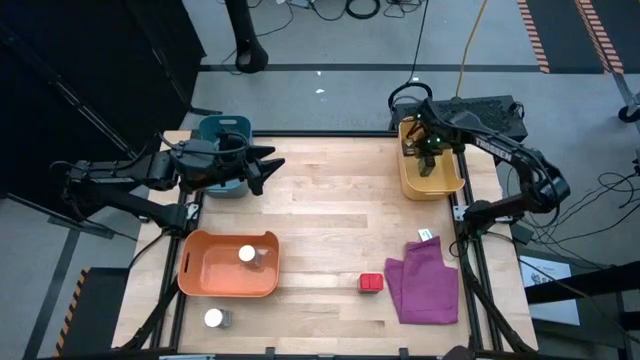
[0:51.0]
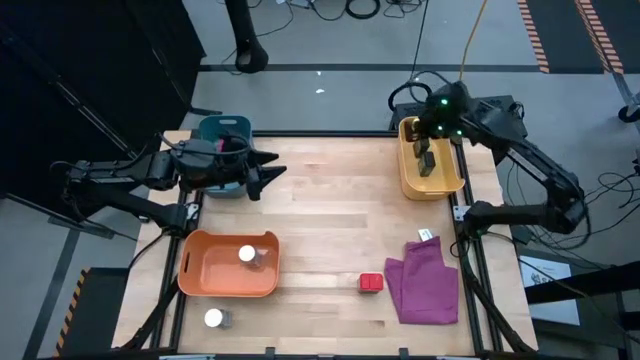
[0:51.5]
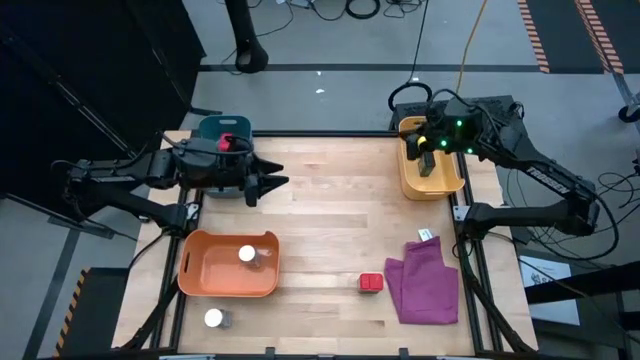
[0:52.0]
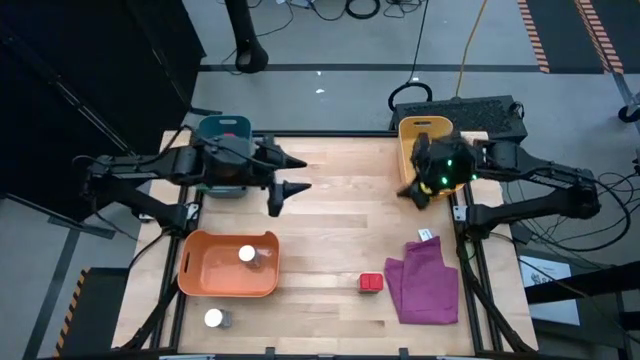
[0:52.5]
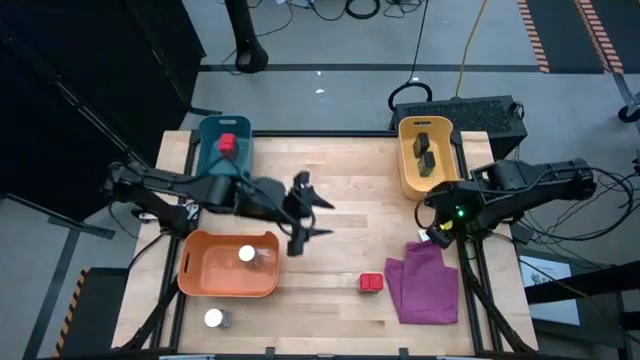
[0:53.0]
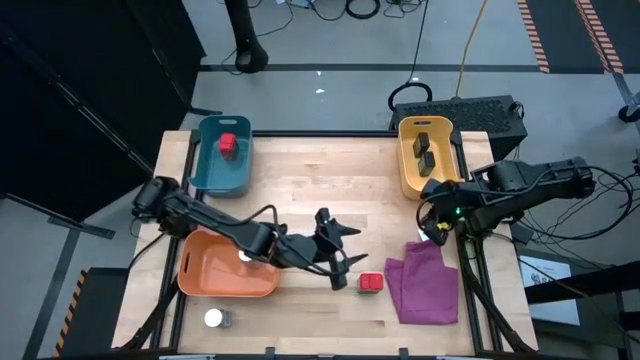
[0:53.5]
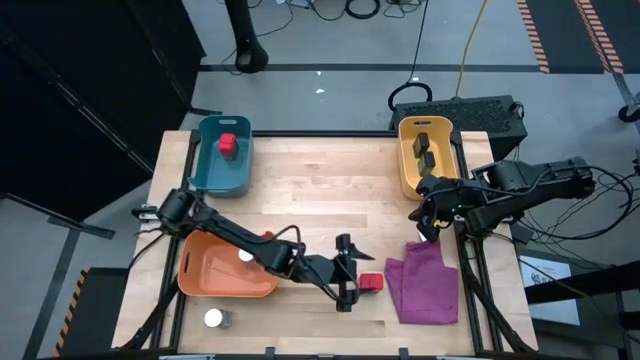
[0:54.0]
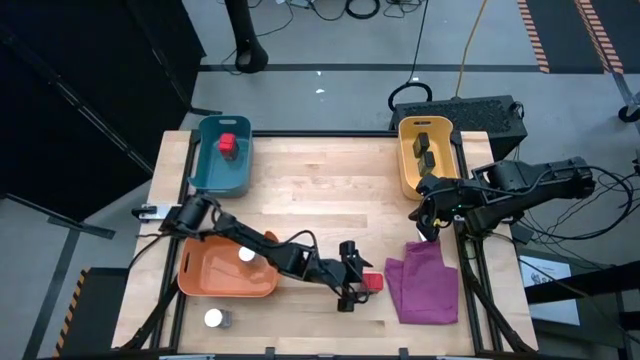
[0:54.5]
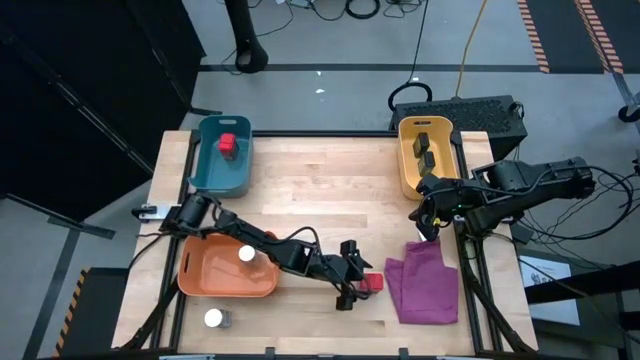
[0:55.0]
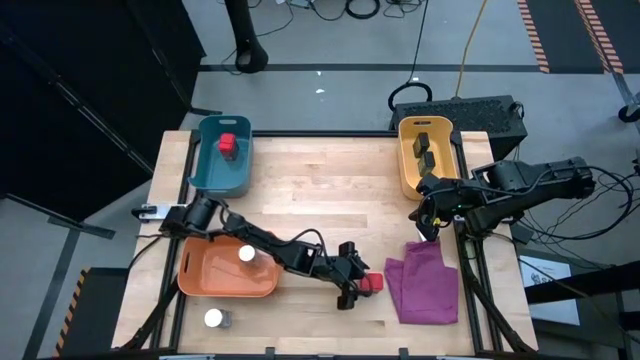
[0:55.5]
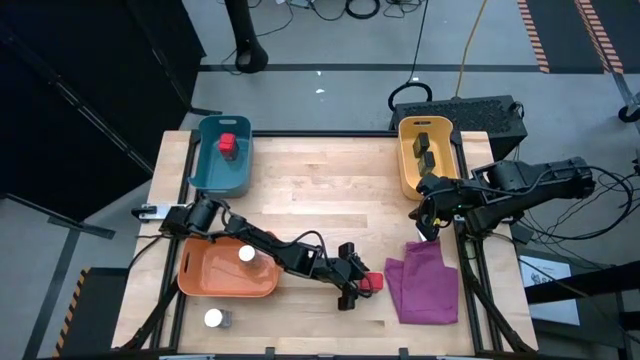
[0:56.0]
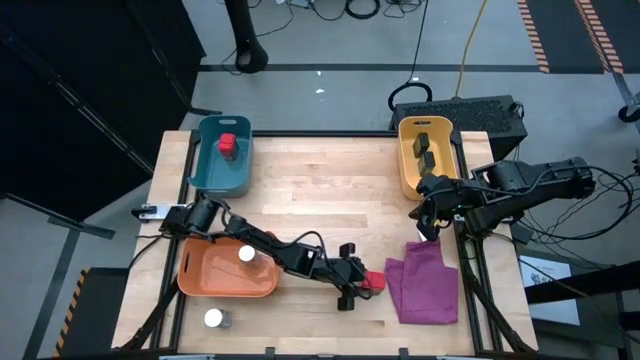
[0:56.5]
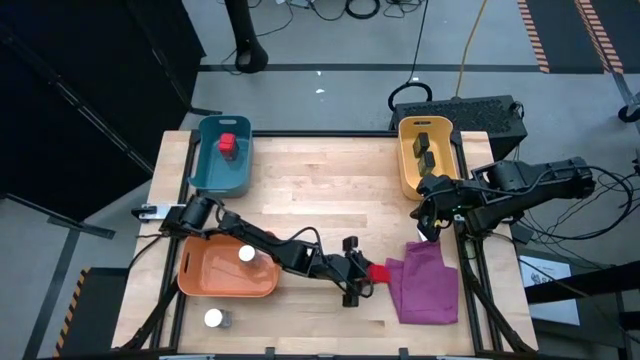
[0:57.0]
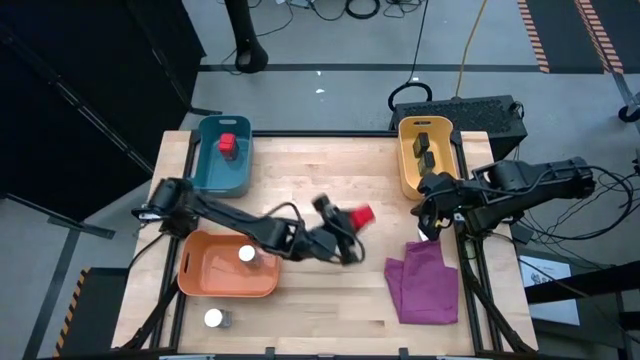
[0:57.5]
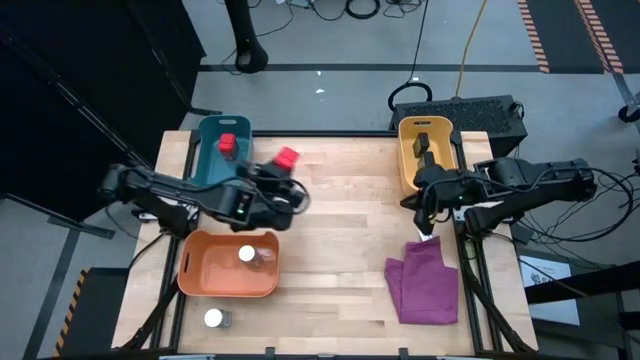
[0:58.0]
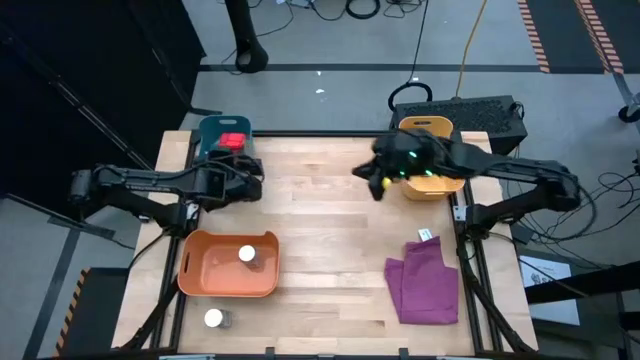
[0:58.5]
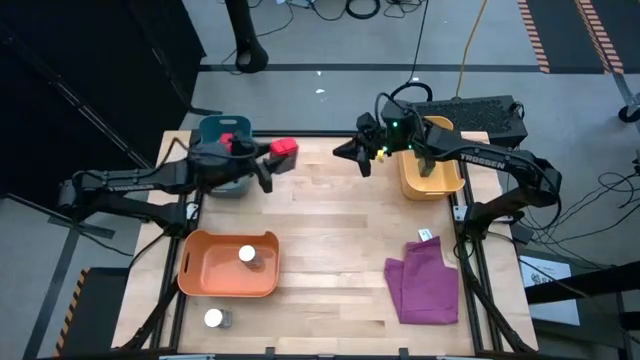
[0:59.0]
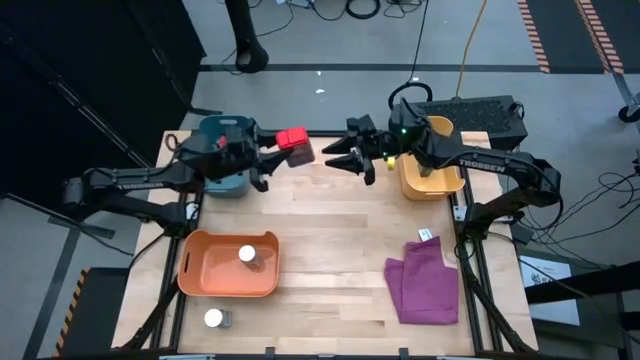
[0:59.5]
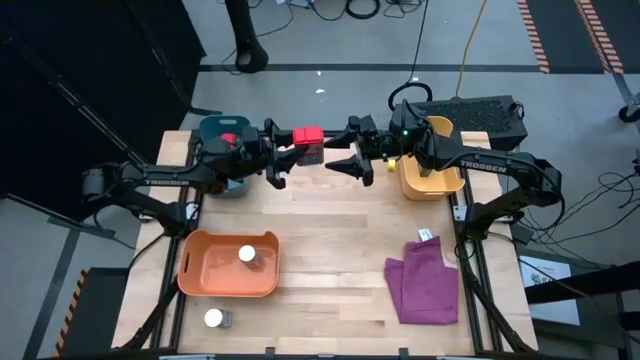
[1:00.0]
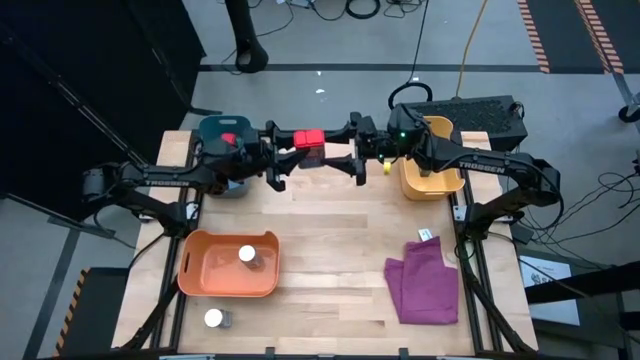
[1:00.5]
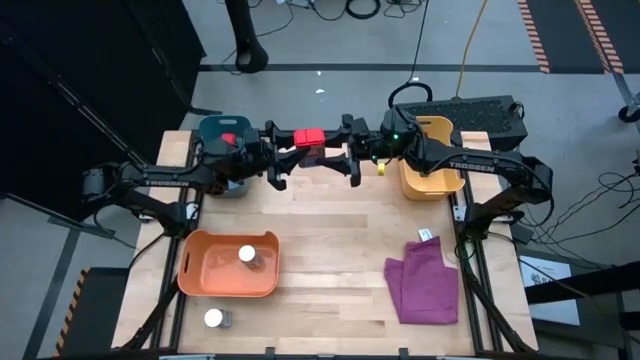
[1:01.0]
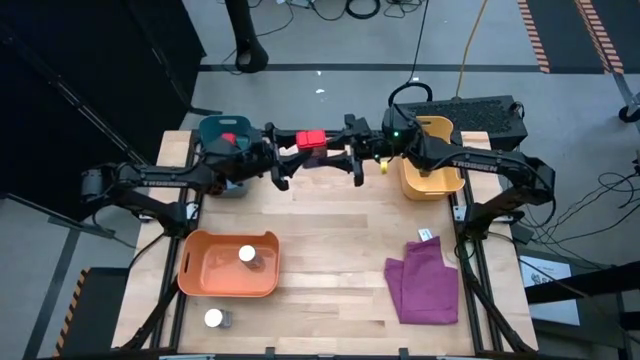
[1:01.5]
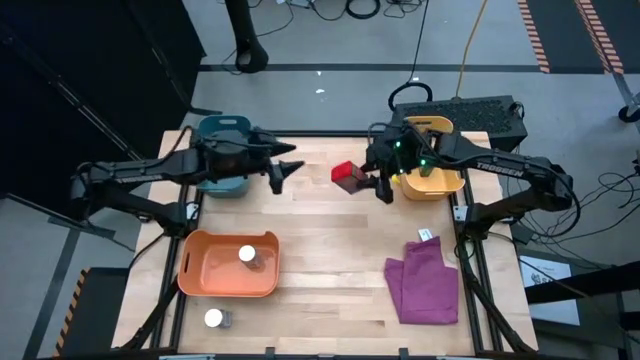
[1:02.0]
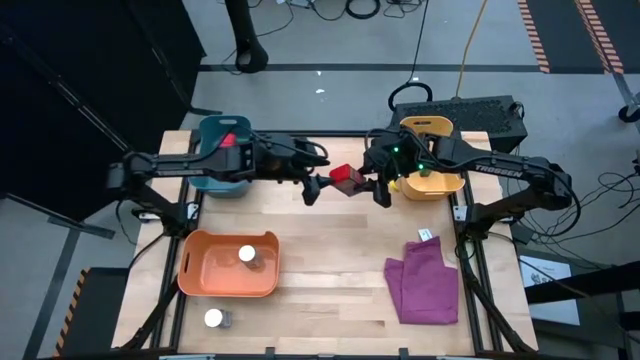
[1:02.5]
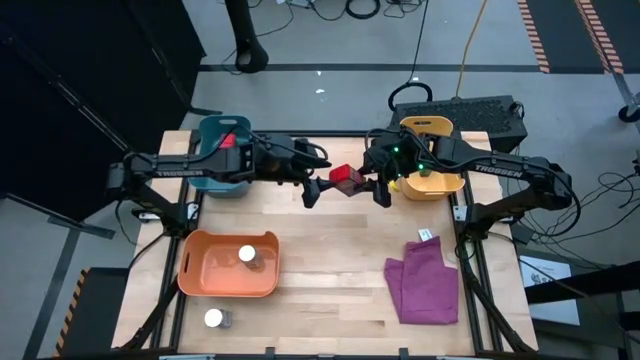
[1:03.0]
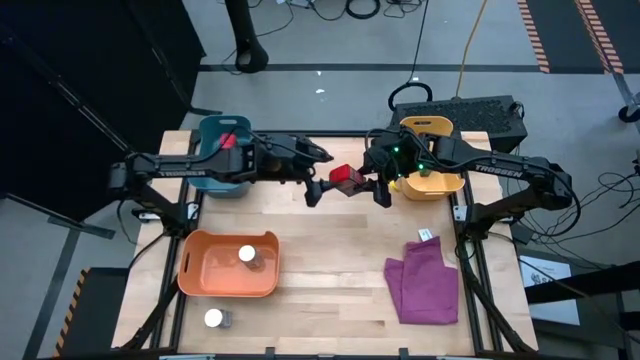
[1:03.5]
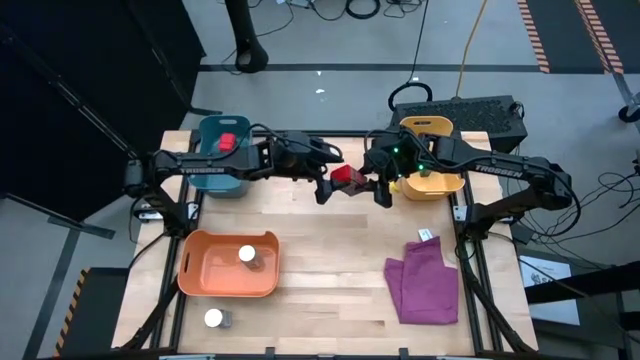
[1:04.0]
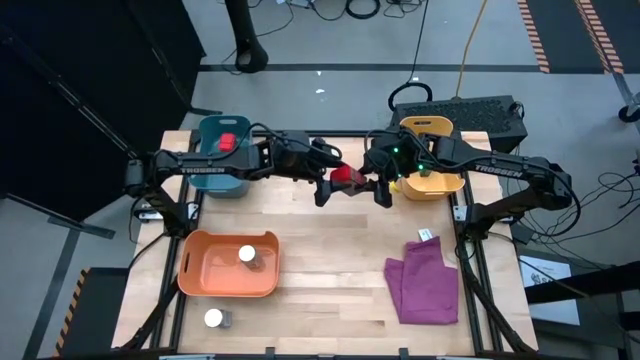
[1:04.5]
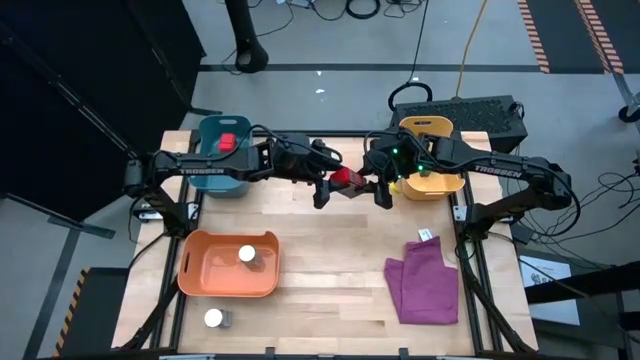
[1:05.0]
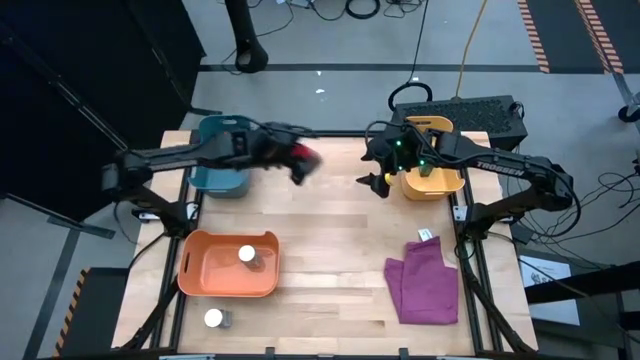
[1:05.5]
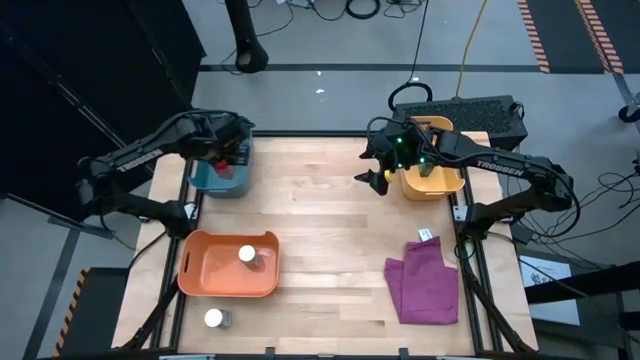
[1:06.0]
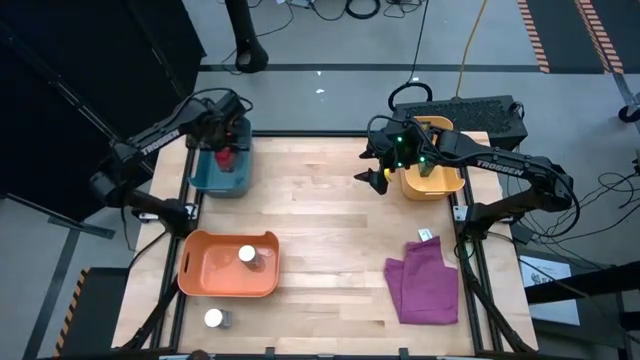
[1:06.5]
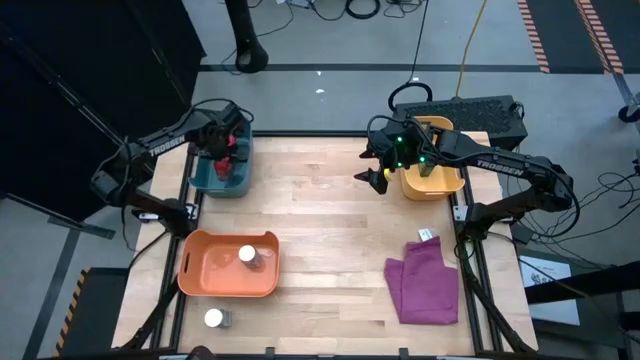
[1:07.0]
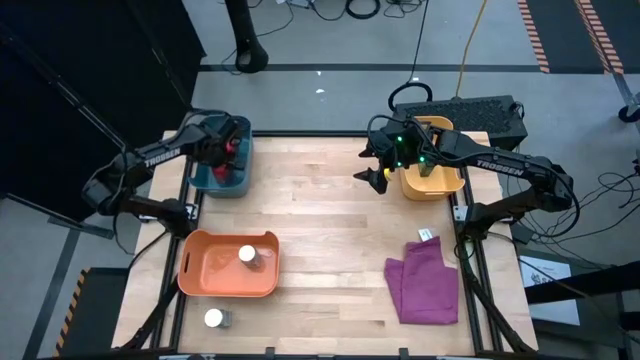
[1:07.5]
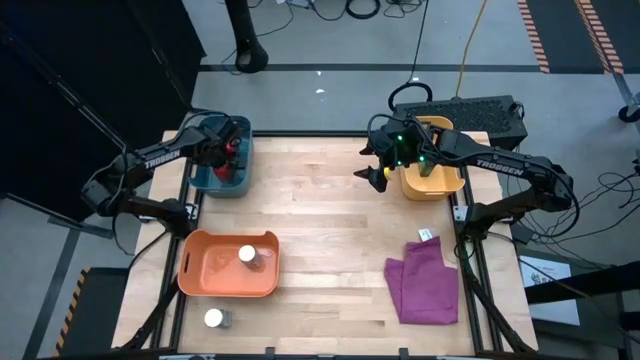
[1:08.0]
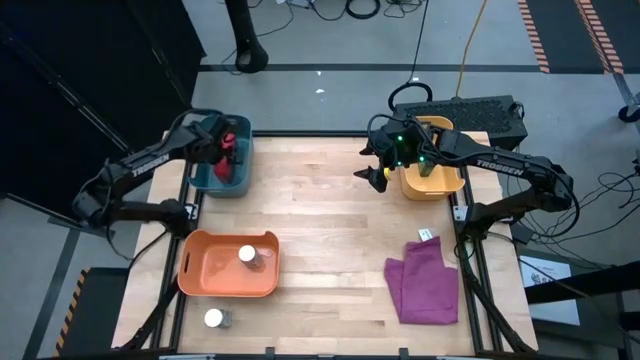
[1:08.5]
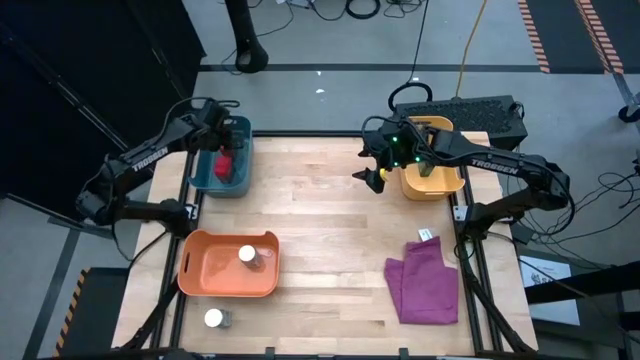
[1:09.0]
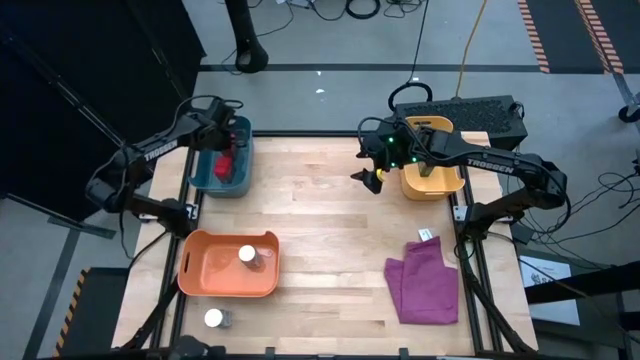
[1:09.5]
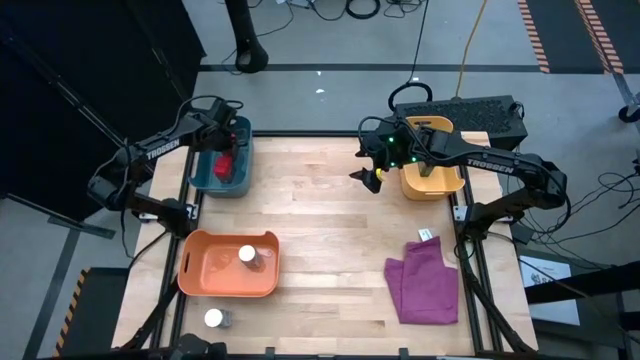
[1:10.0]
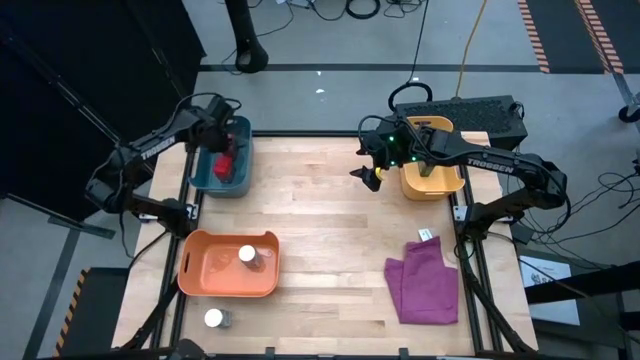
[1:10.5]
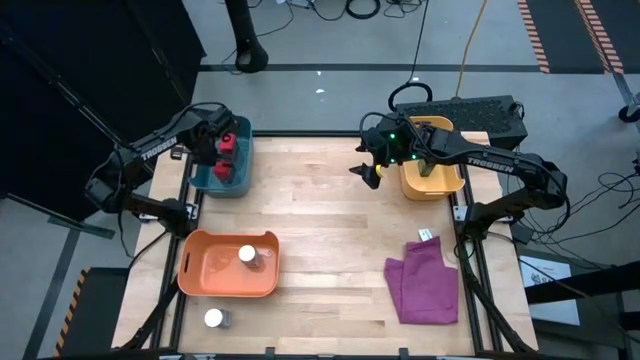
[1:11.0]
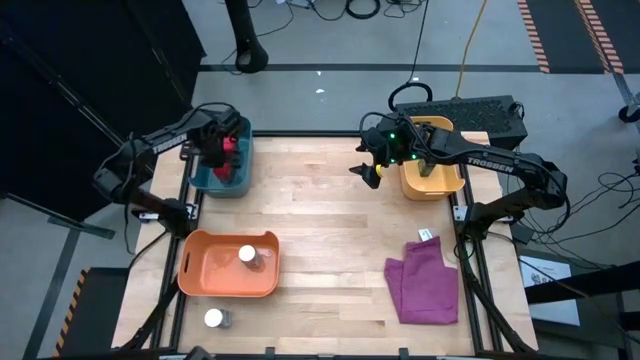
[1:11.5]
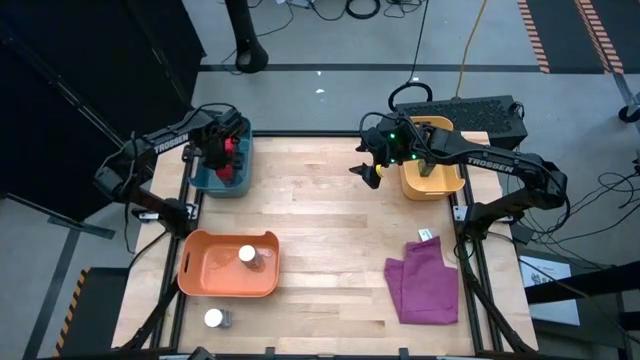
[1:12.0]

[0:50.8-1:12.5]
Task: Sort spices by type
Put the red seasoning can into the blue bin
